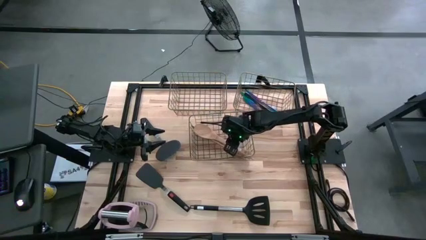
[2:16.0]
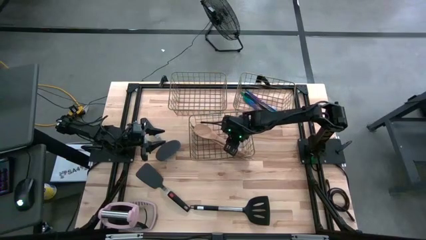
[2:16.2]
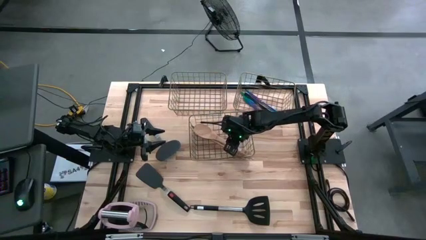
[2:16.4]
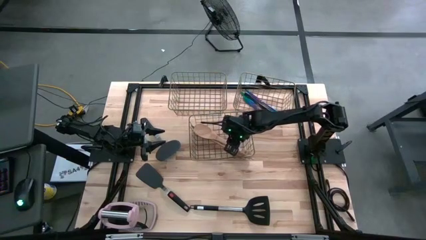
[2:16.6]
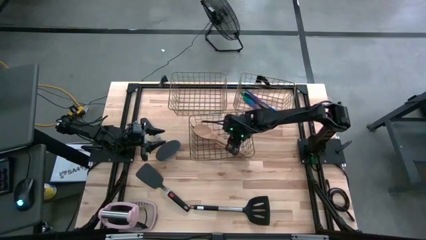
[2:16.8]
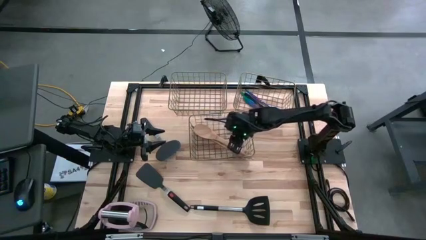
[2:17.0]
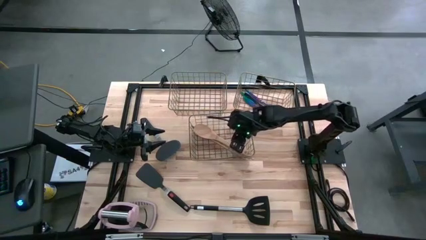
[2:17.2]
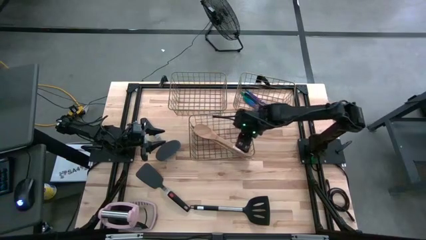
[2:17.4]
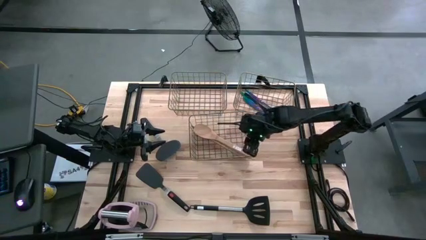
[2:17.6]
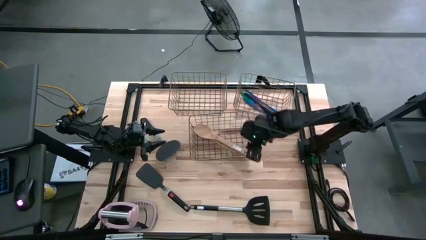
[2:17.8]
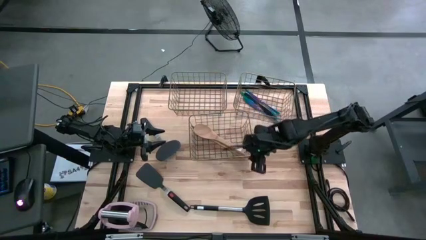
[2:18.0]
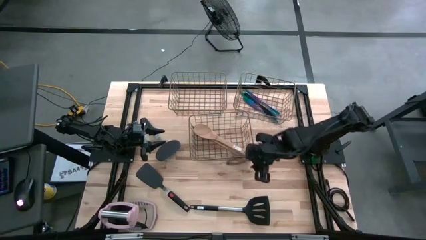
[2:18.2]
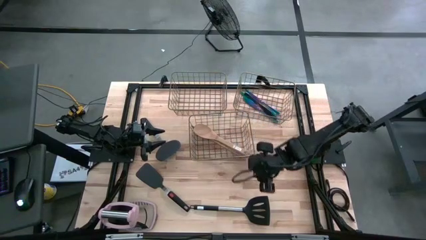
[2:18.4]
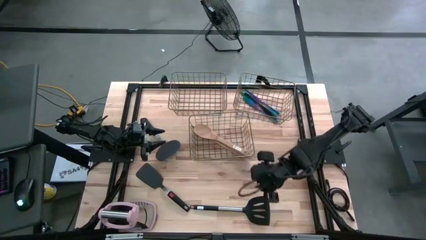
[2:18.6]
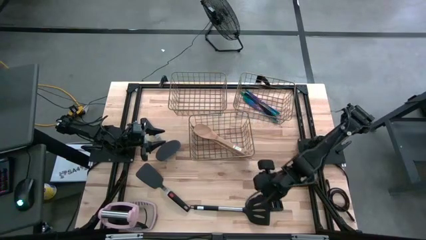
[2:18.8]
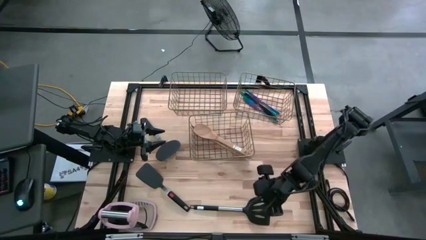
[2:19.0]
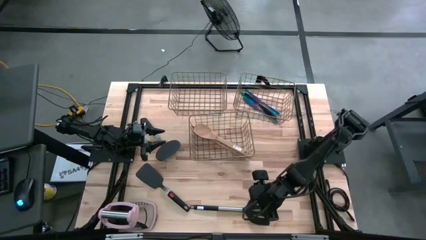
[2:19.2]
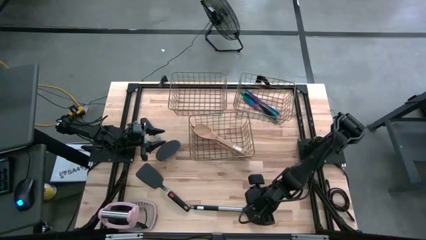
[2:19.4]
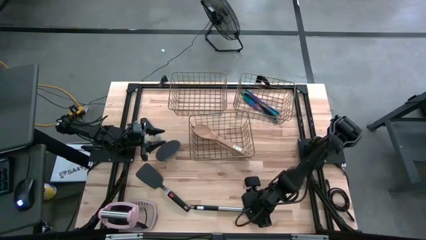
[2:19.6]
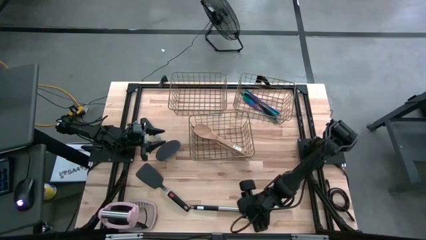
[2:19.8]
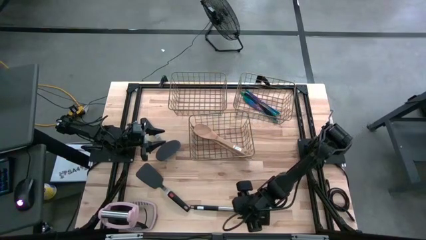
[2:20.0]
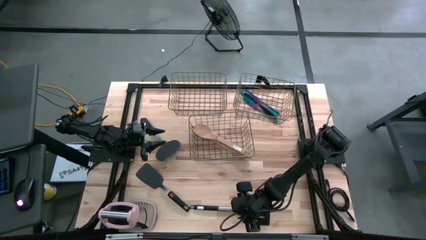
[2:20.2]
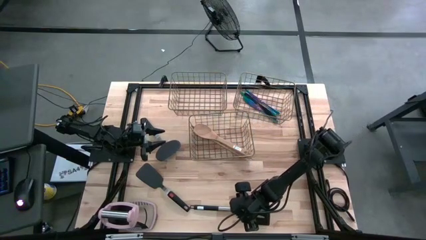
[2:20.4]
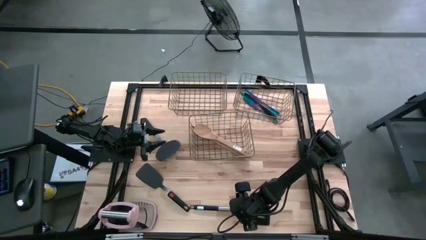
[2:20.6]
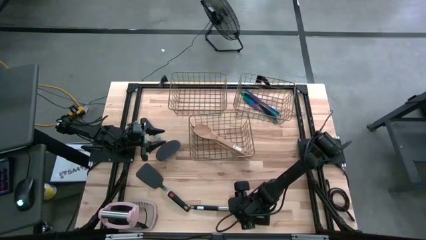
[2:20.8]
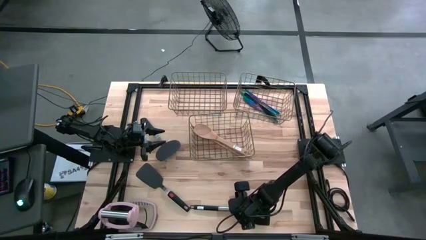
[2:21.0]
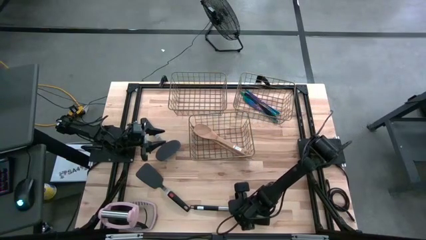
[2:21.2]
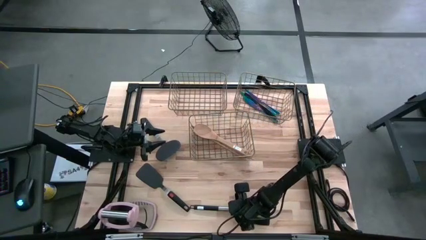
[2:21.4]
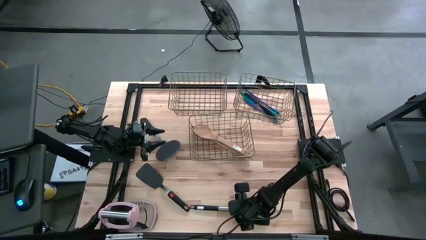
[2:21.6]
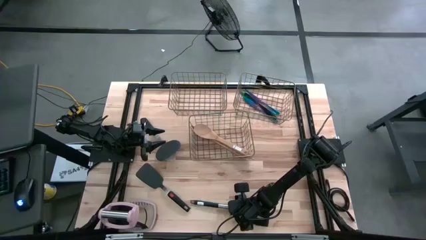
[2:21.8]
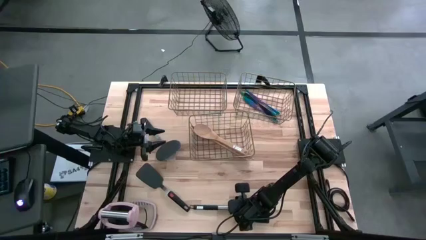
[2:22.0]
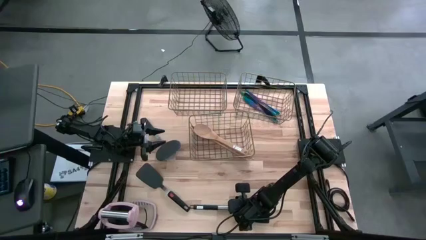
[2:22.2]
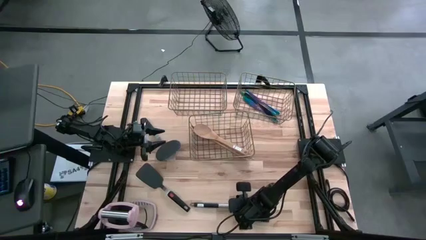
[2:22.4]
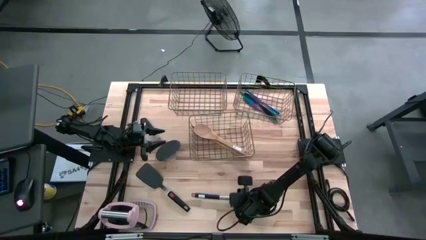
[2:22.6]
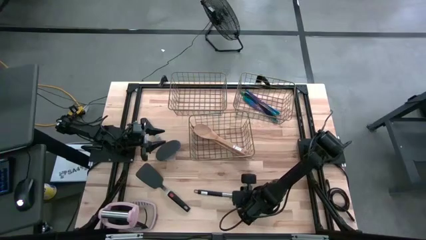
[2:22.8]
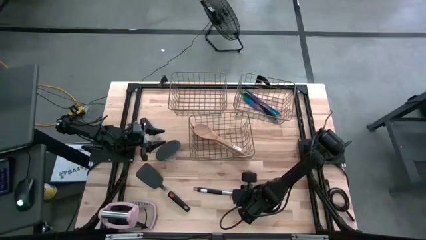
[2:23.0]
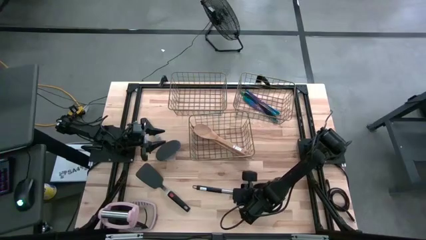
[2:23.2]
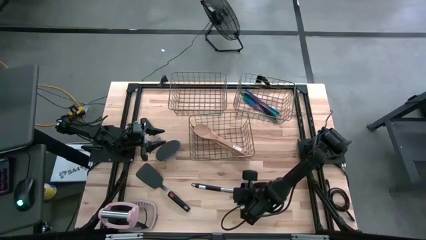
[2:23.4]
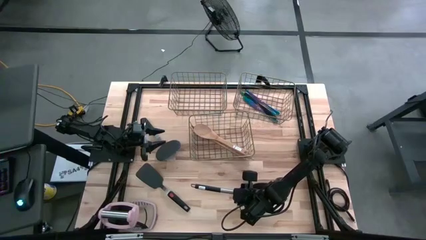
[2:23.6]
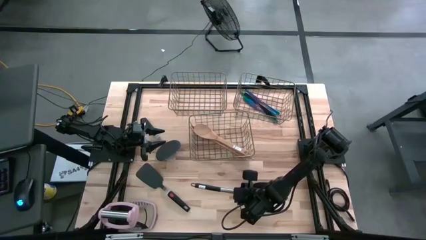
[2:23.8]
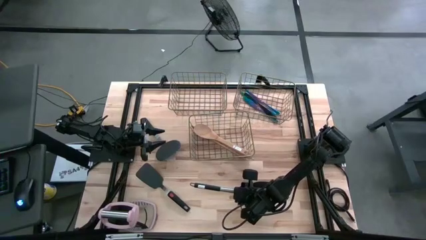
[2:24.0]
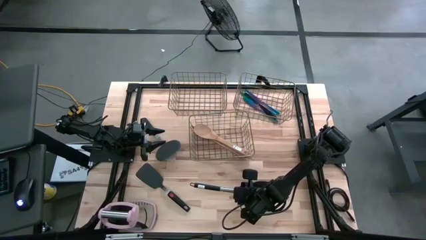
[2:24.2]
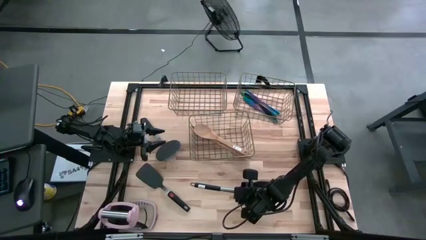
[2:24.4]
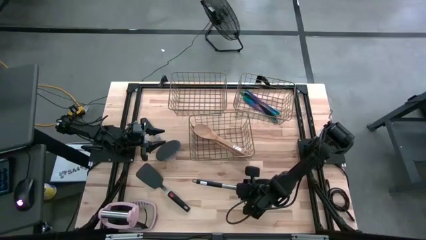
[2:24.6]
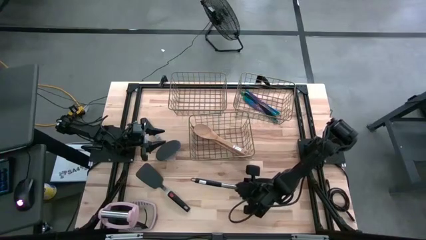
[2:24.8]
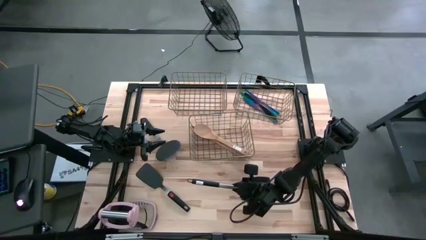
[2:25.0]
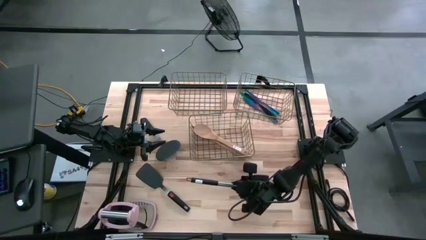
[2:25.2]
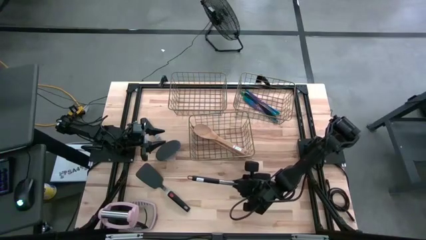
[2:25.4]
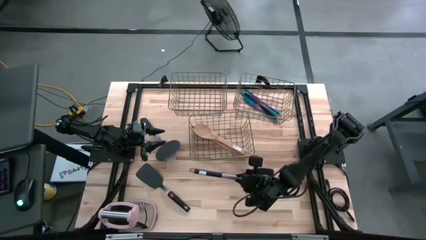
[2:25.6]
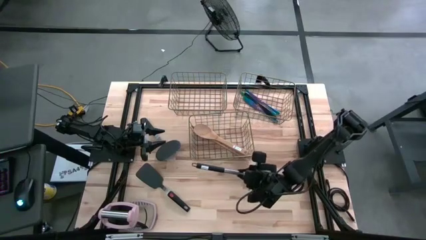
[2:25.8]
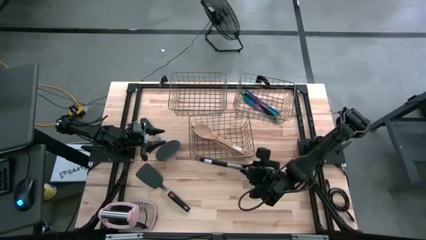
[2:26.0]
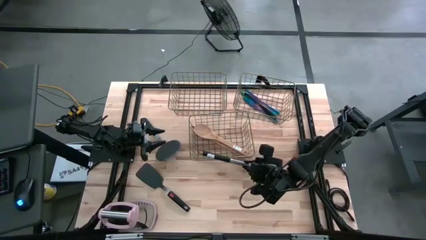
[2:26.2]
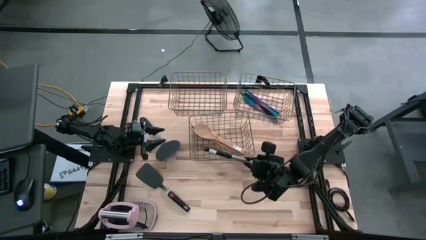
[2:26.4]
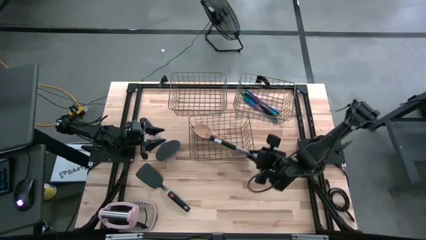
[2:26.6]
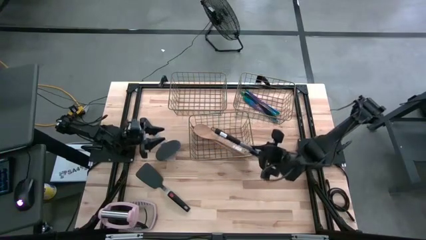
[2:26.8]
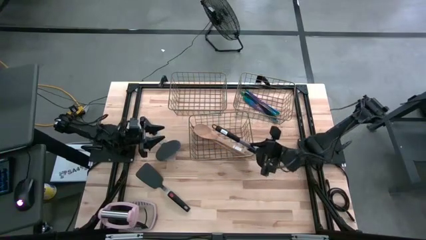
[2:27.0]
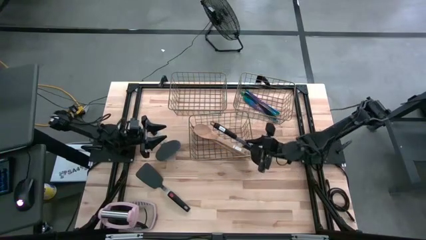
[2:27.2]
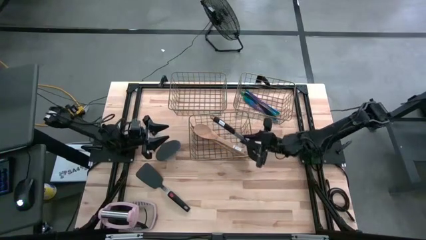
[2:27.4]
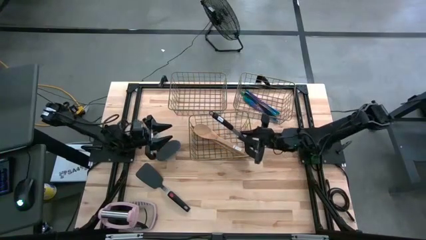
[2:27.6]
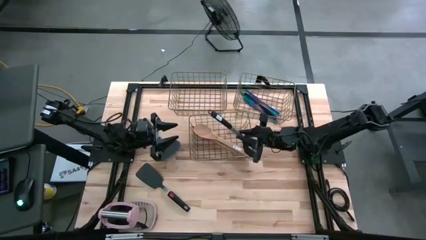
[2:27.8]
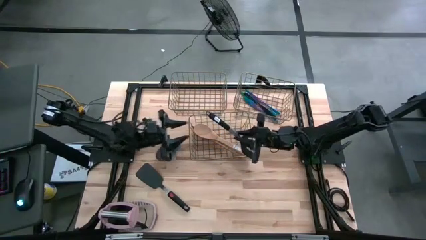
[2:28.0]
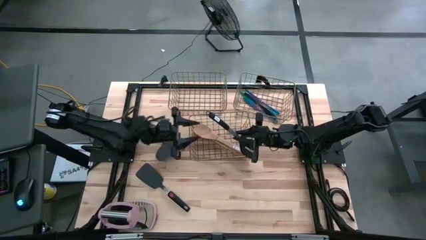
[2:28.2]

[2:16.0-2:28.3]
Task: Pick & Place Kitchen Items
Put the black slotted spatula into the top left wire basket

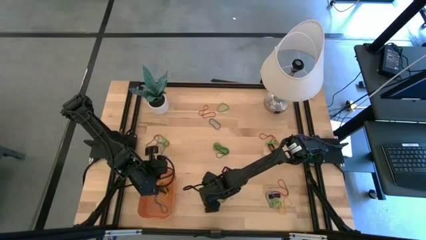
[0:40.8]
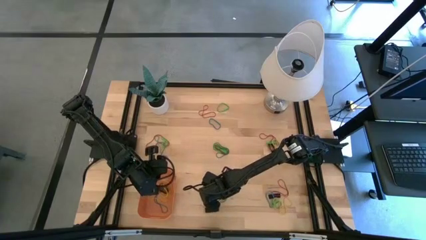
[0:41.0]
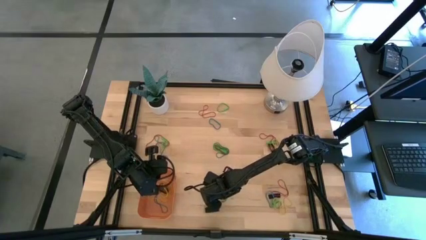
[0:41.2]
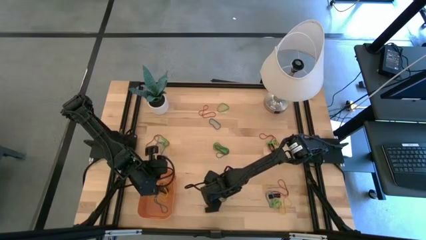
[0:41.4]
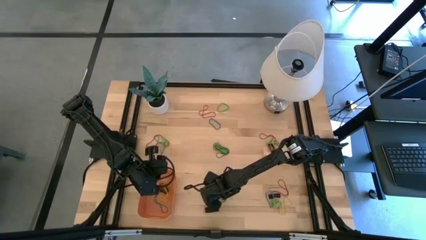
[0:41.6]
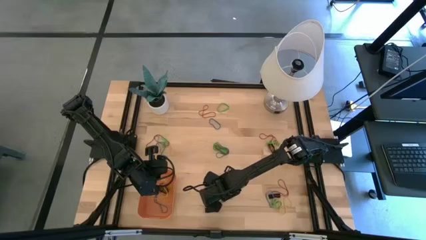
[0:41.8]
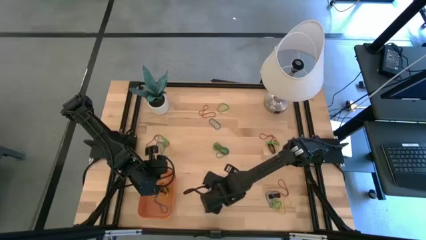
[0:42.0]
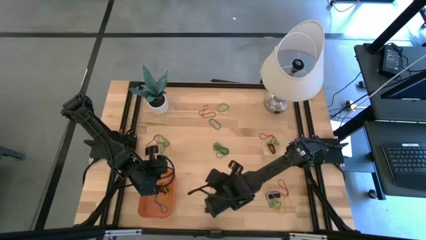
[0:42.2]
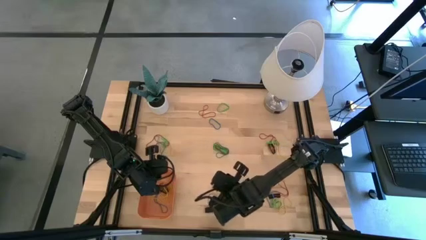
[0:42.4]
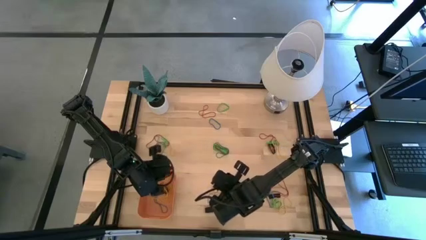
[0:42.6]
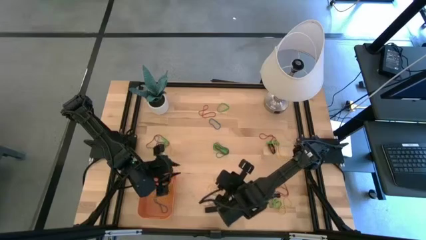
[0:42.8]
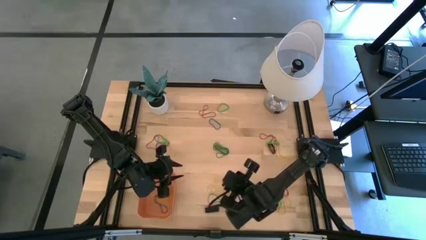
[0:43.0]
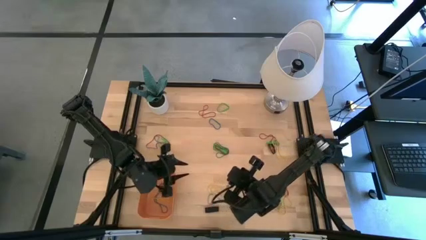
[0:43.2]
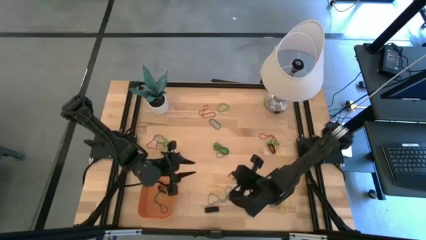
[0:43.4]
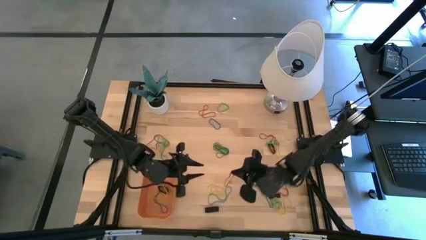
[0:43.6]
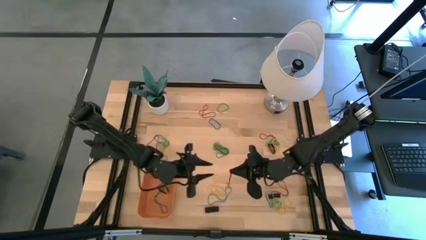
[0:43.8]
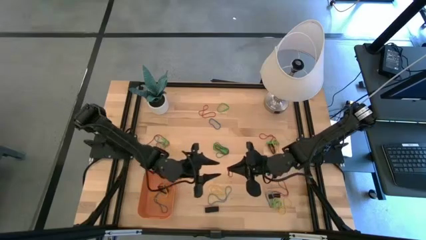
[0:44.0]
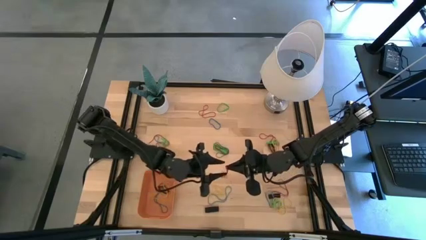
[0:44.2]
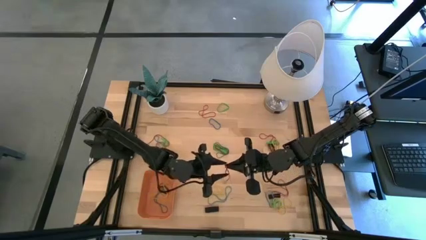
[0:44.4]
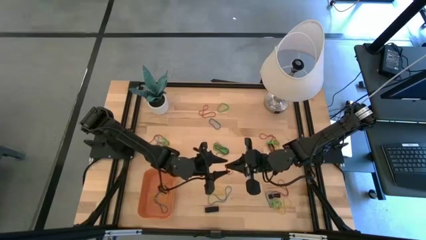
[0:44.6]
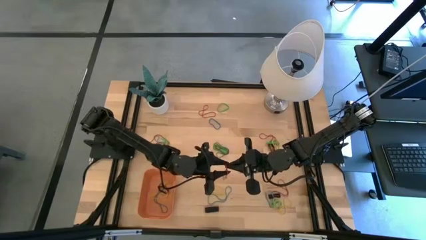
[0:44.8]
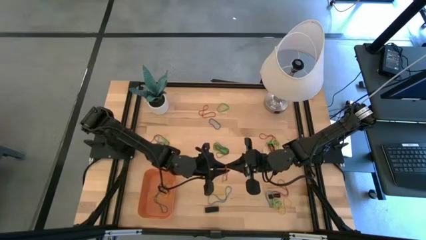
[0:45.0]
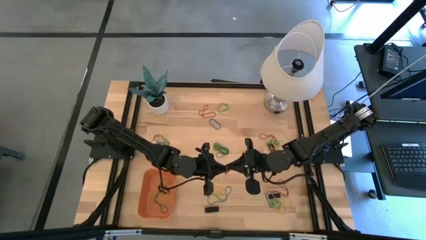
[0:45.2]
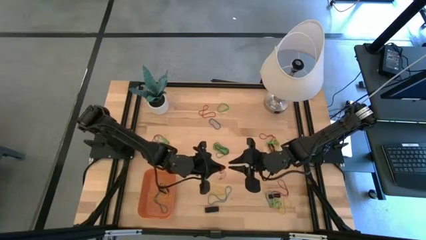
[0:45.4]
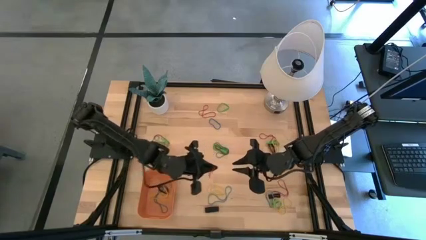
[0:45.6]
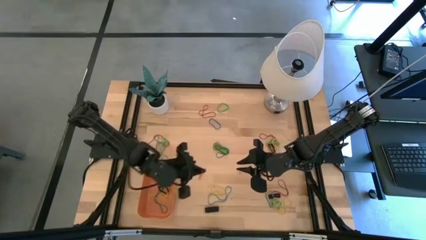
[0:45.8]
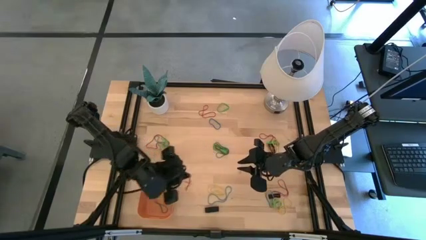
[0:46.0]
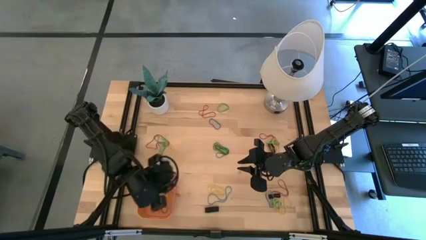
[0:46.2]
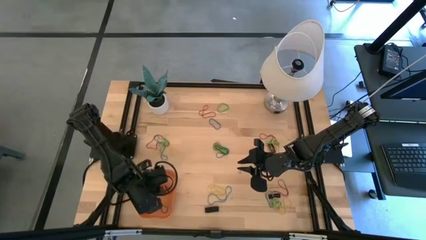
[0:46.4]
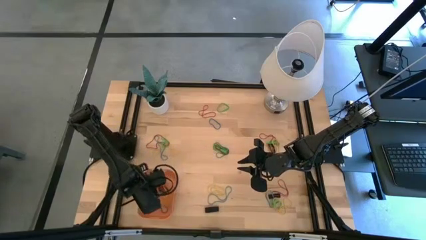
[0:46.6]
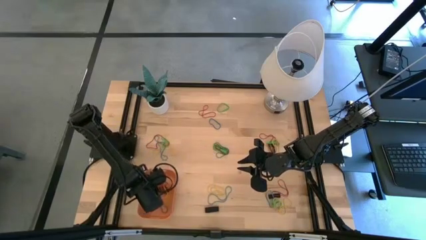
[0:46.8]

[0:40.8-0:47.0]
Task: Pick and place rubber bands into bin
Put the red rubber band into the orange bin
